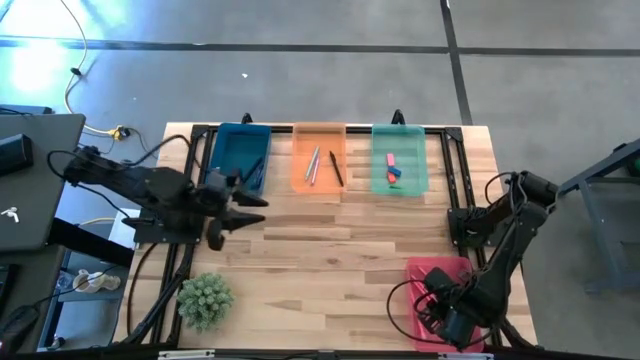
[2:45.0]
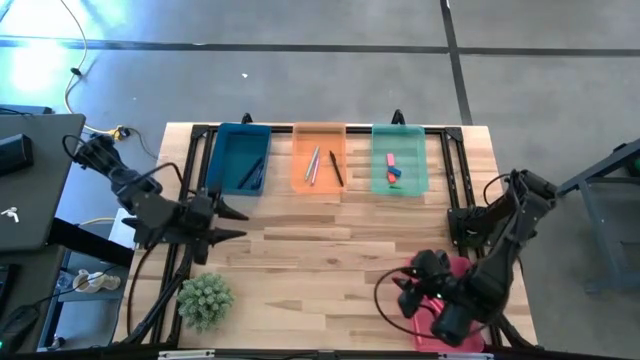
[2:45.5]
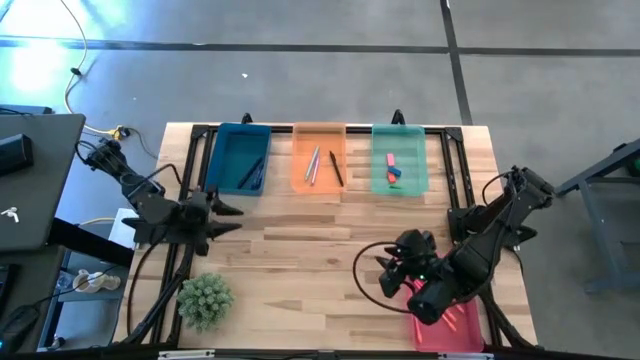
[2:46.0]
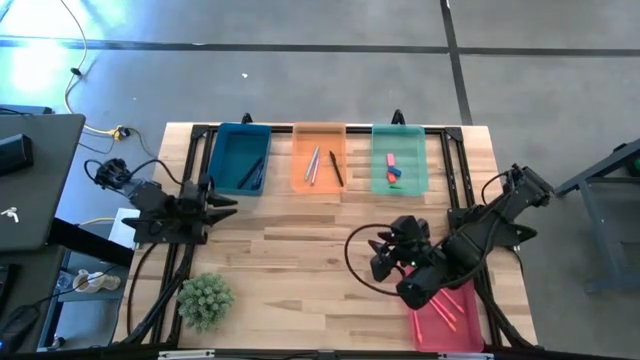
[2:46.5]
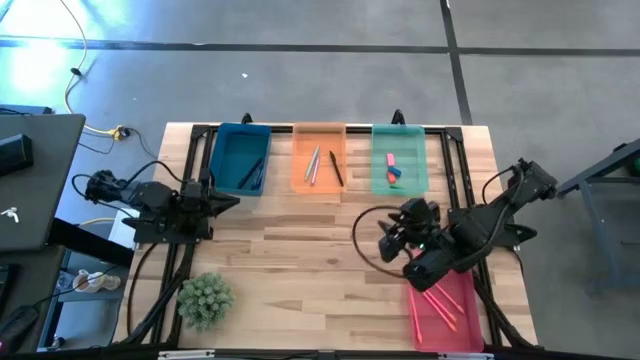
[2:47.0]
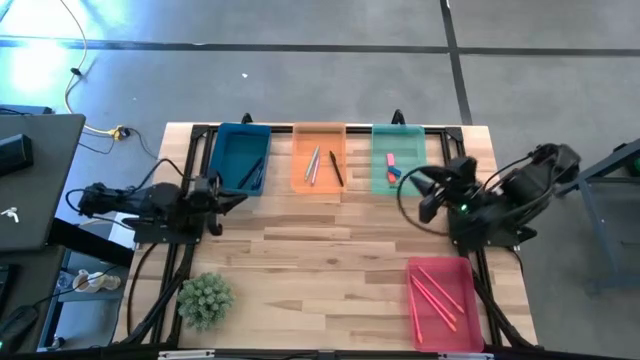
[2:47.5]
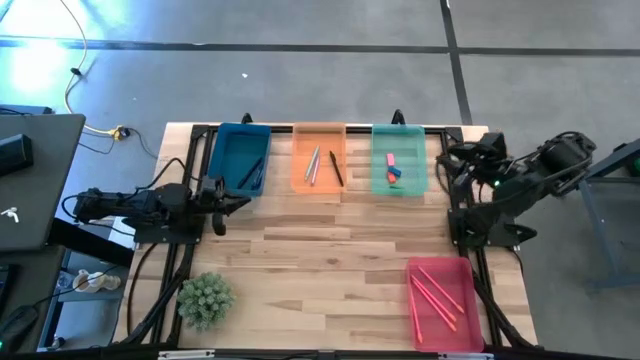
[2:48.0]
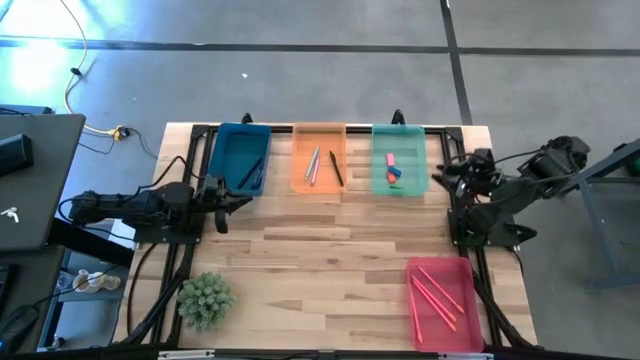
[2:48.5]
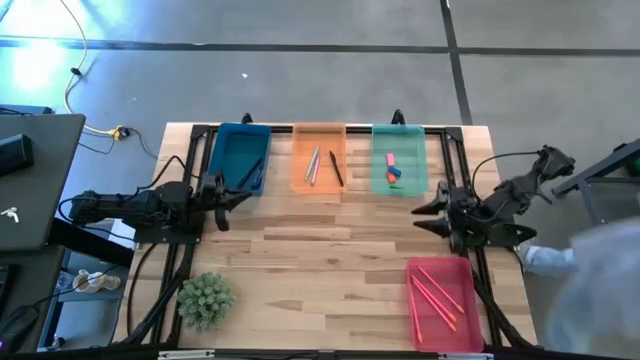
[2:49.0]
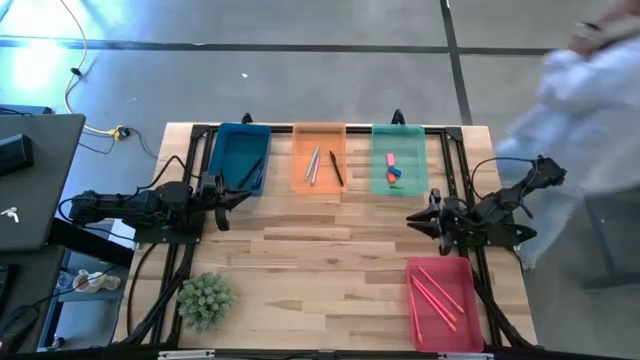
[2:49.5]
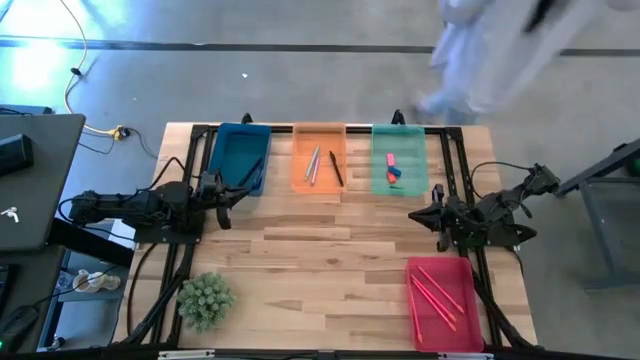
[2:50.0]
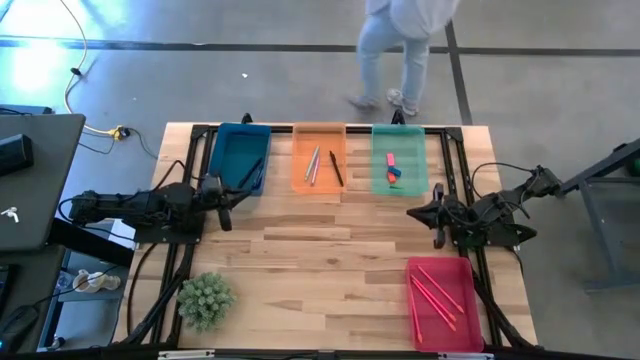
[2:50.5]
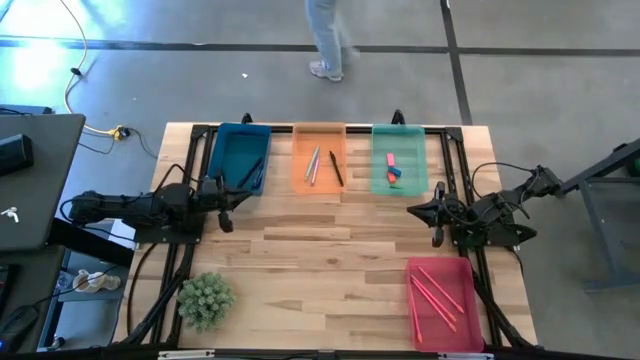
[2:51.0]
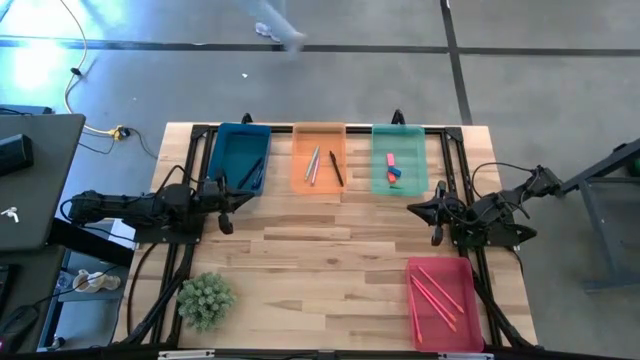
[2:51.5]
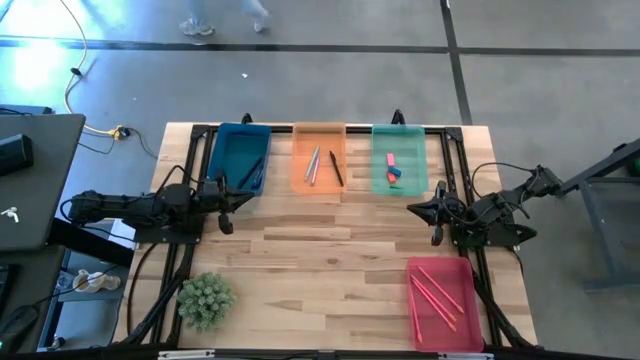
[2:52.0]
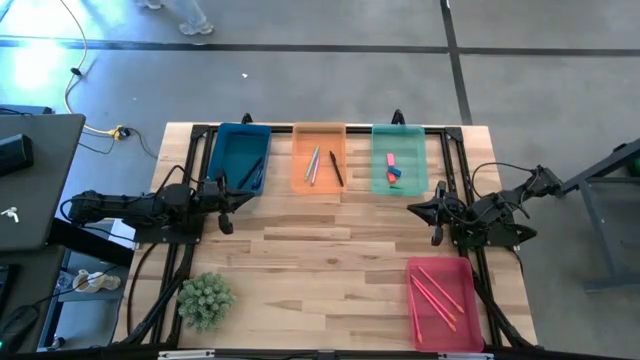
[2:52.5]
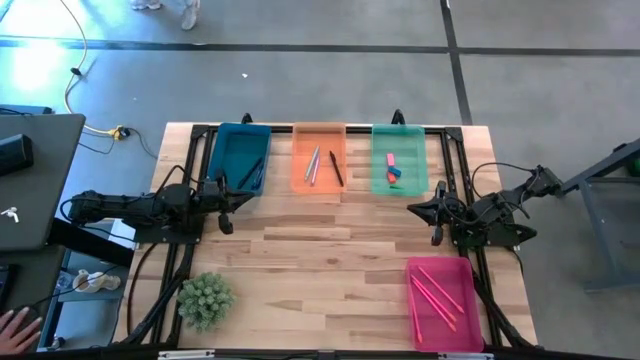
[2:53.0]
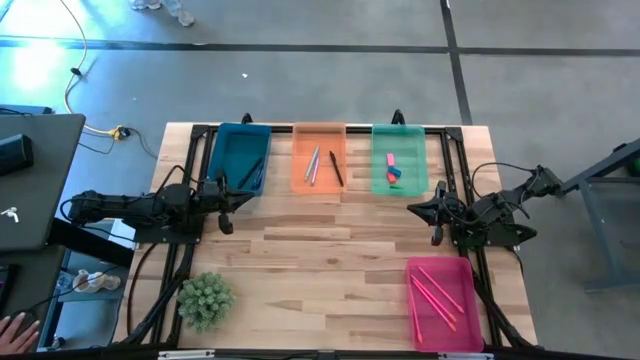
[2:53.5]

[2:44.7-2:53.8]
Task: Sort crayons/erasers/pens/pencils in bins
Return to Home Position
